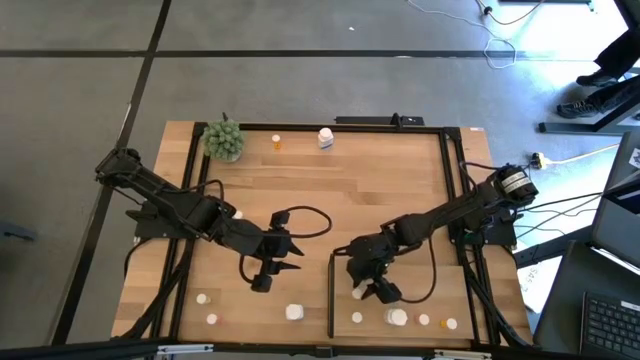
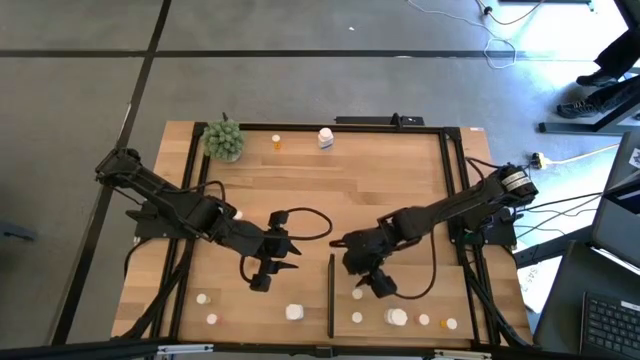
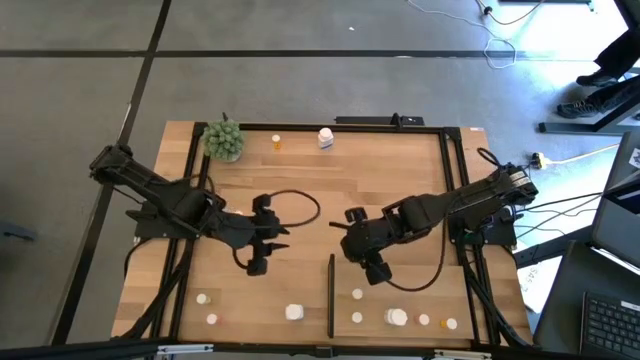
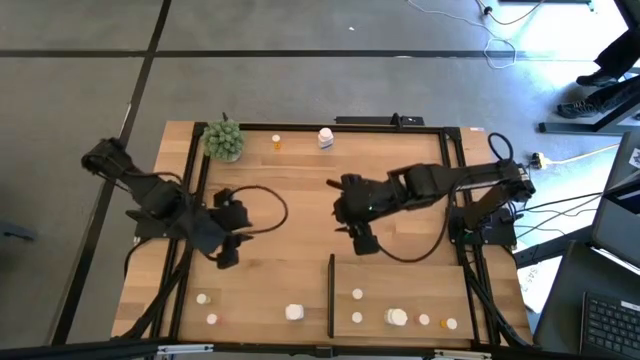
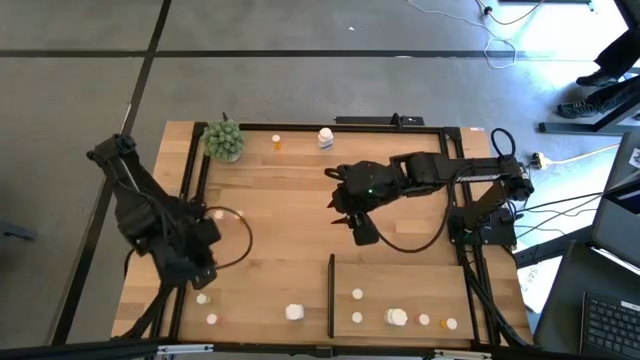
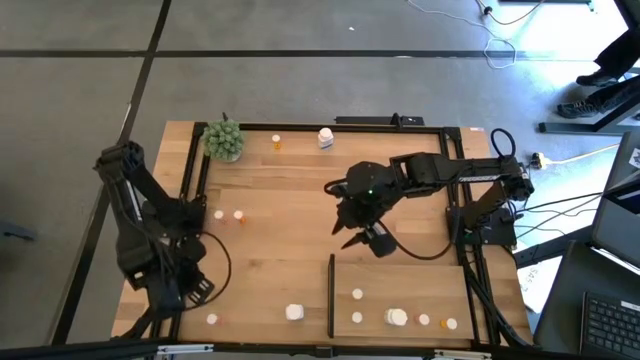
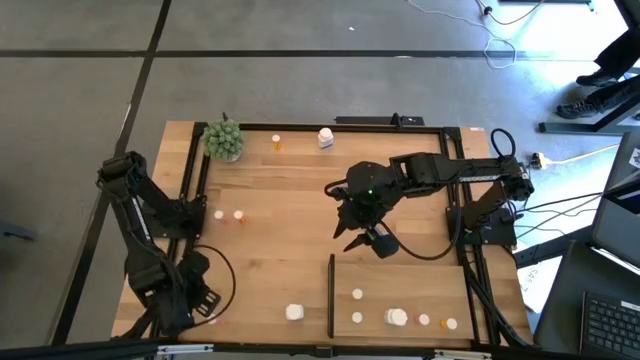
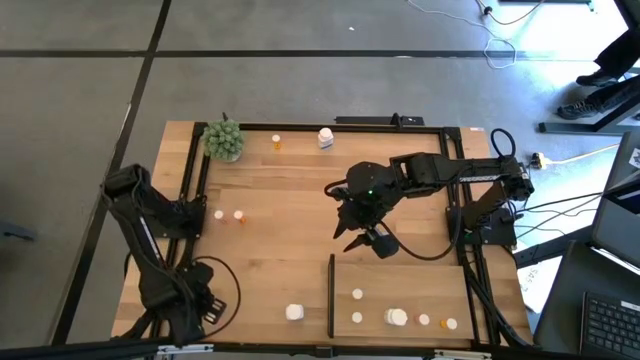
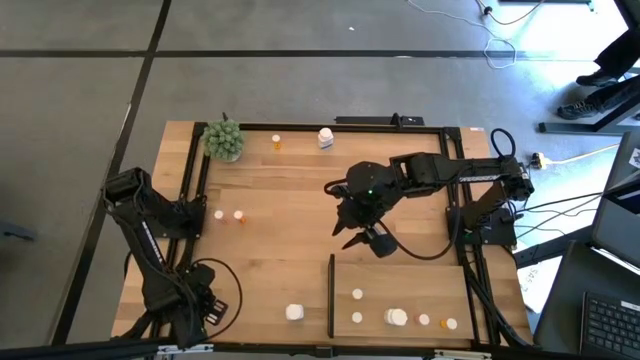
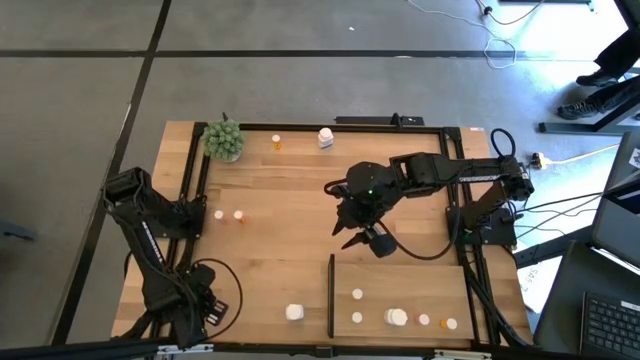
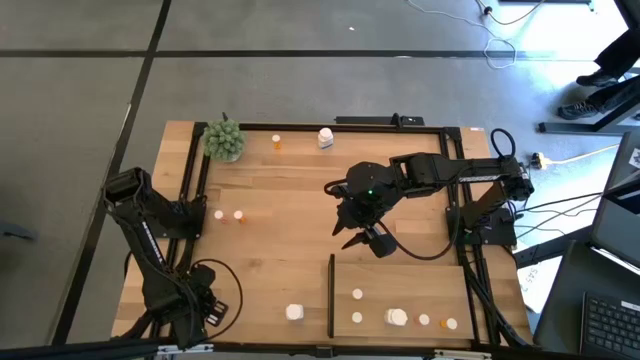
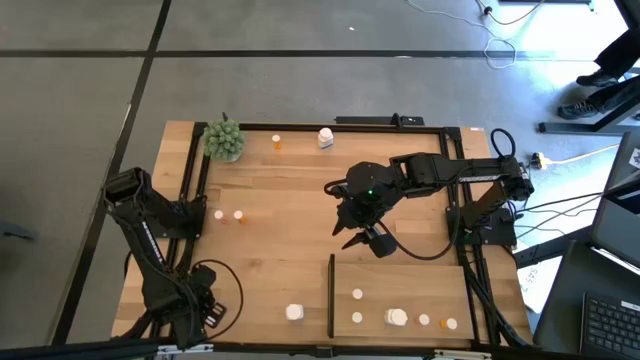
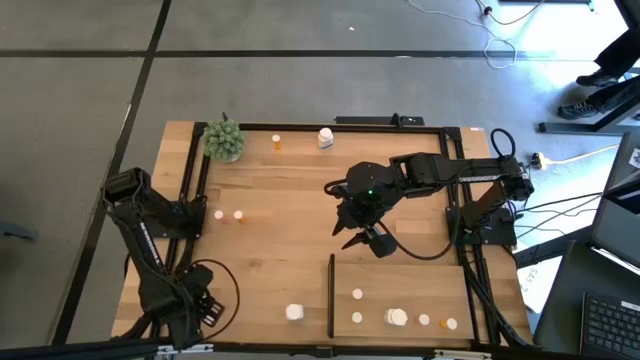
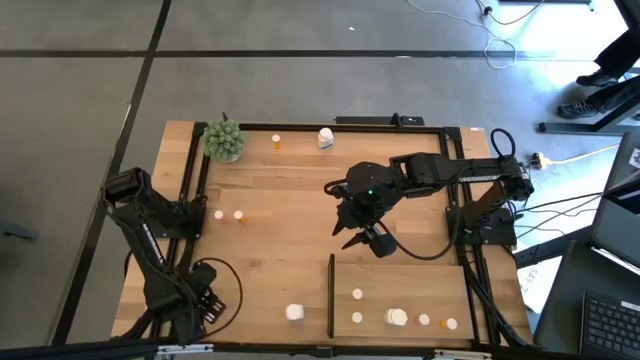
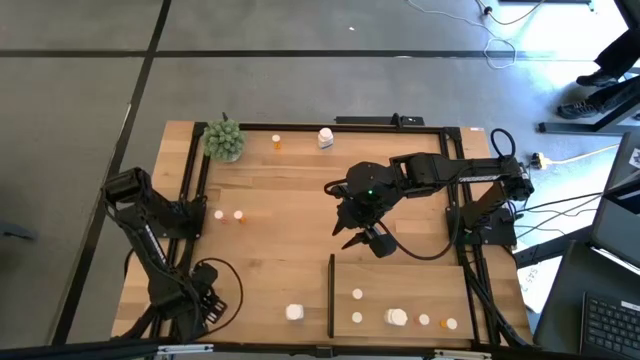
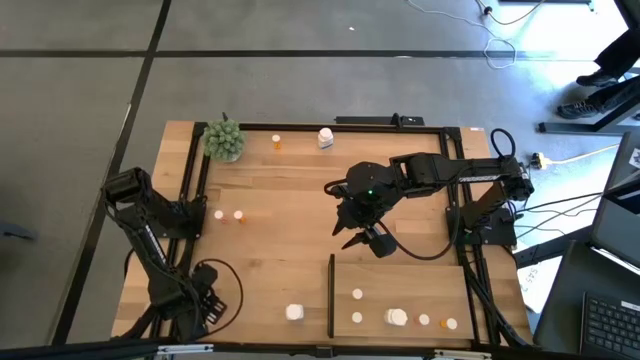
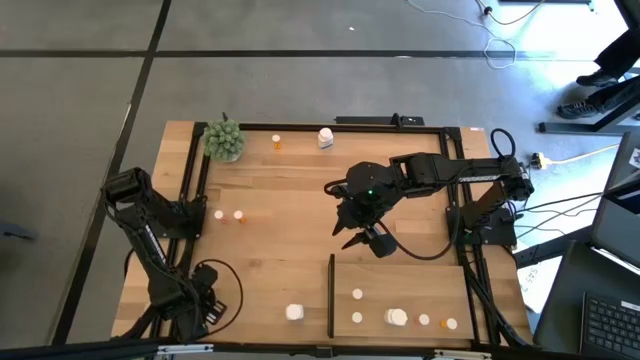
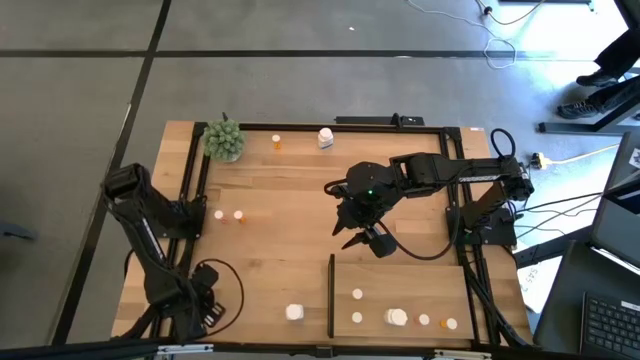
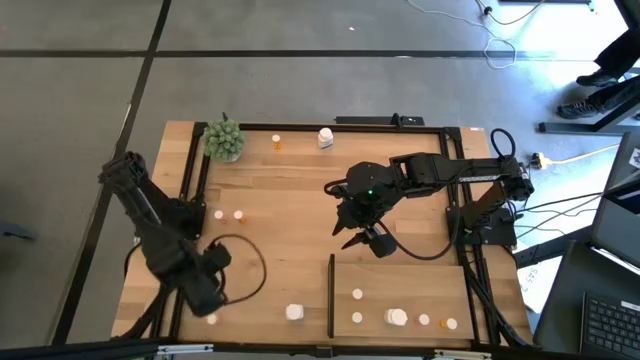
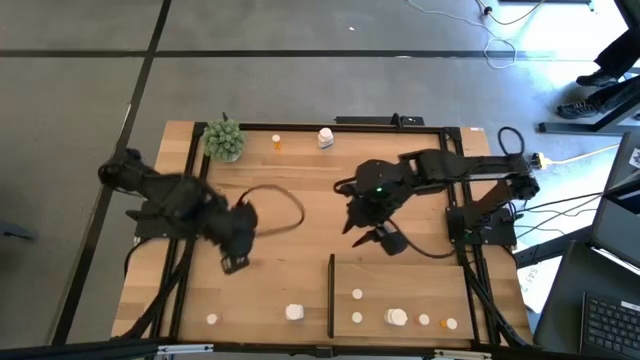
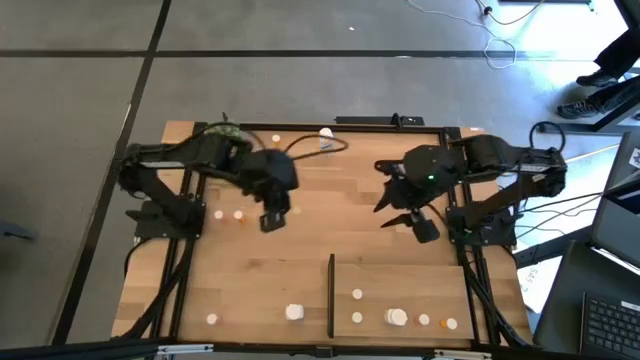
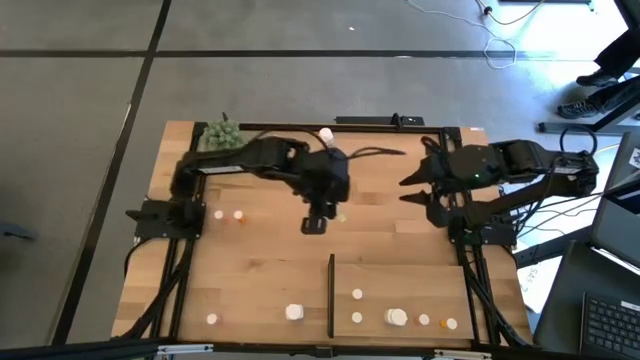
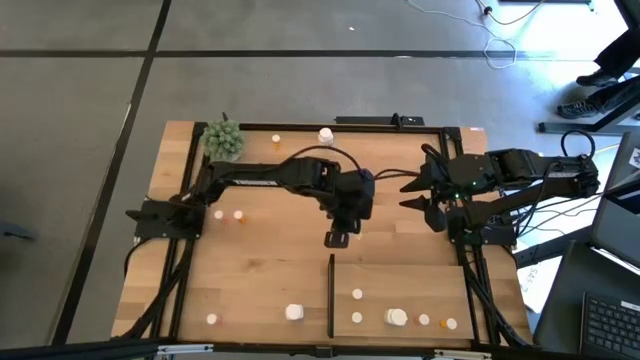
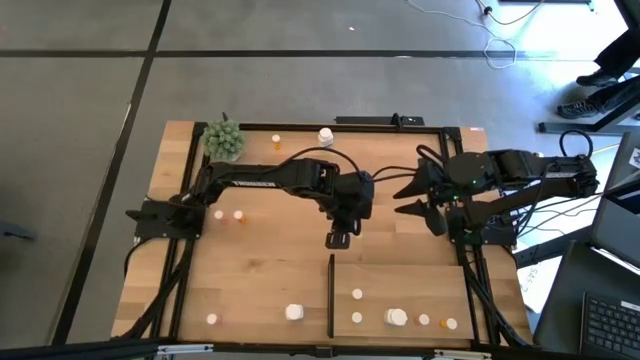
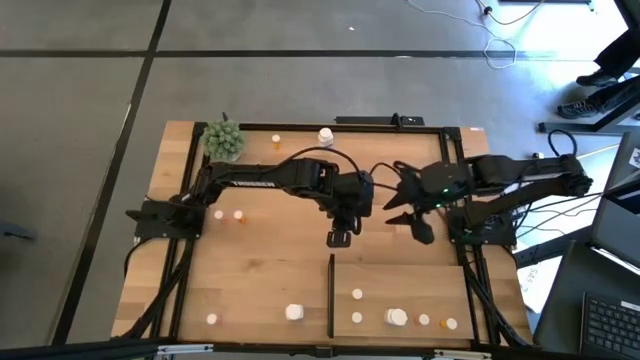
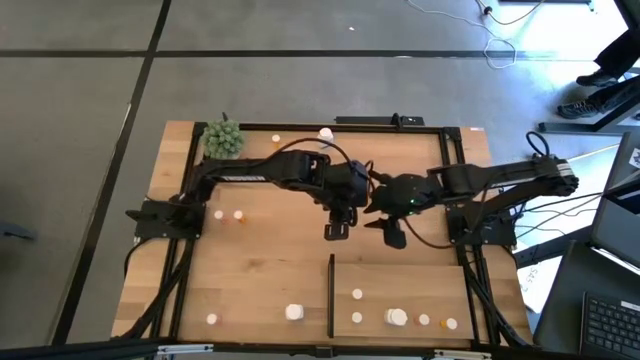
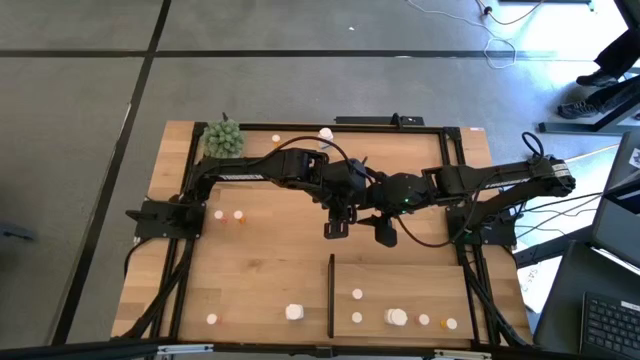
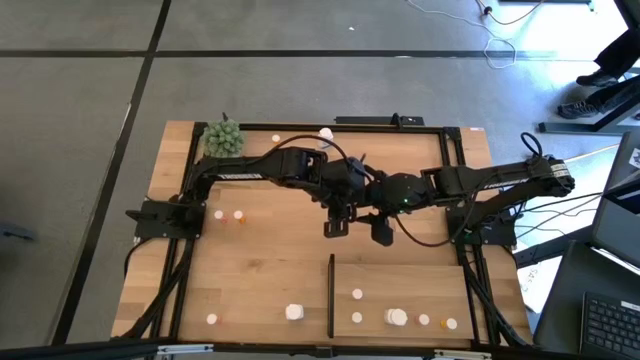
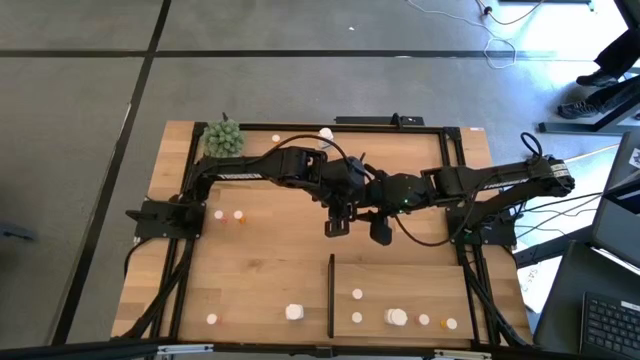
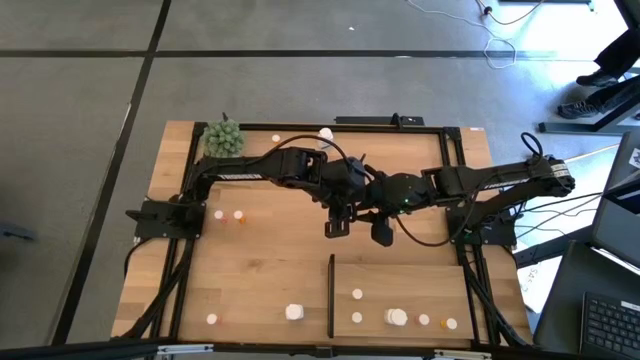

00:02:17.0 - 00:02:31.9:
Task: Pick and place medicine bottles onto shelf by color
Put the yellow pill bottle on the shelf aligned with the other yellow pill bottles

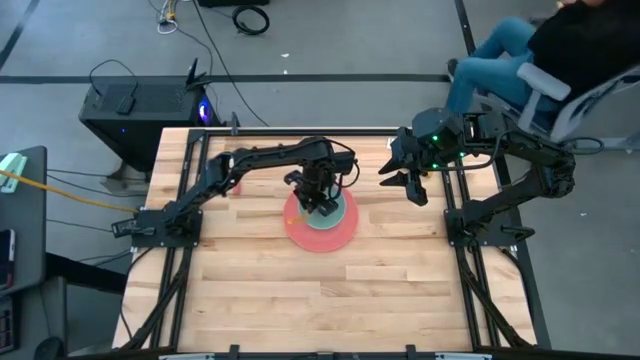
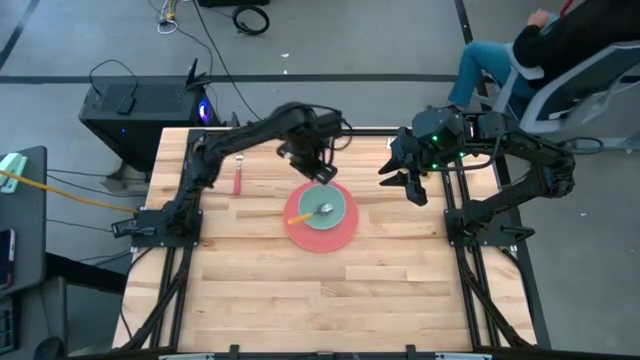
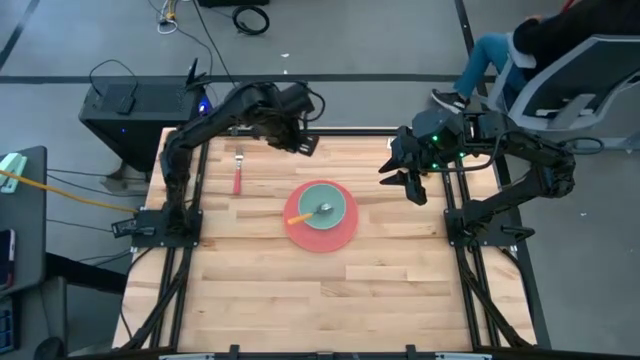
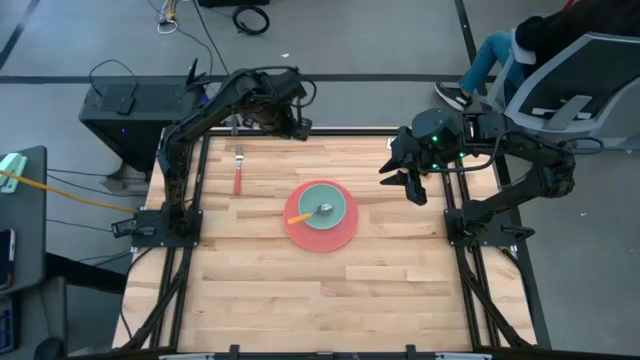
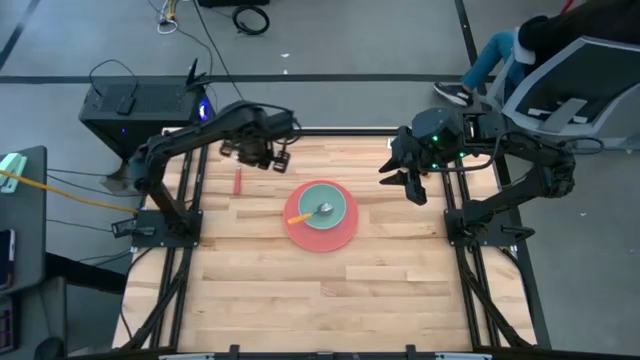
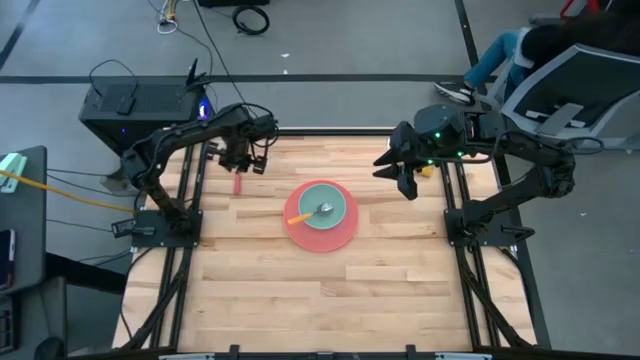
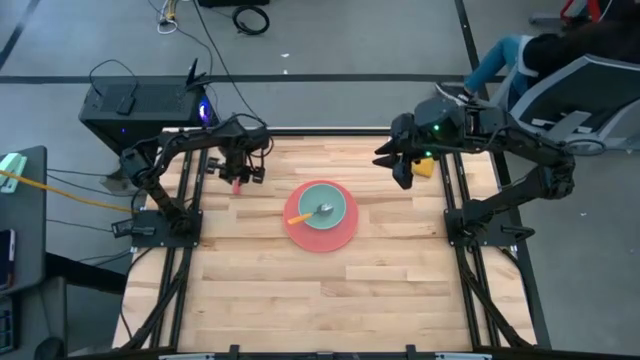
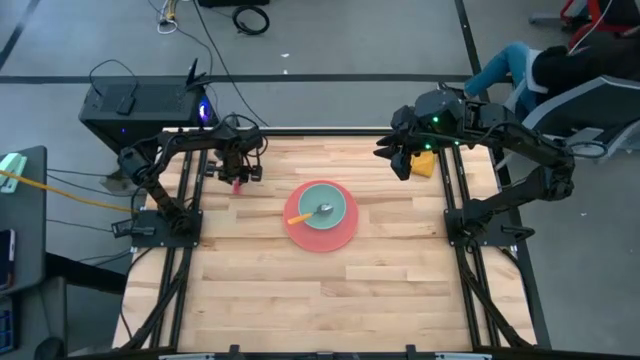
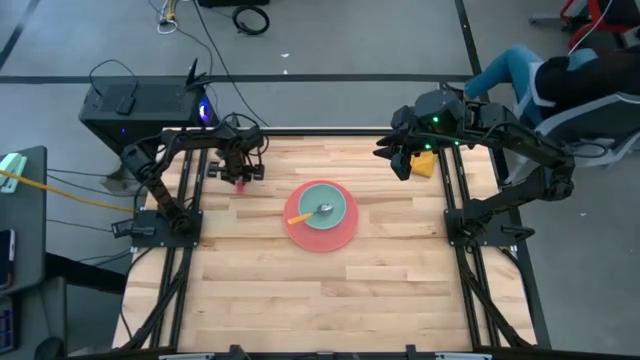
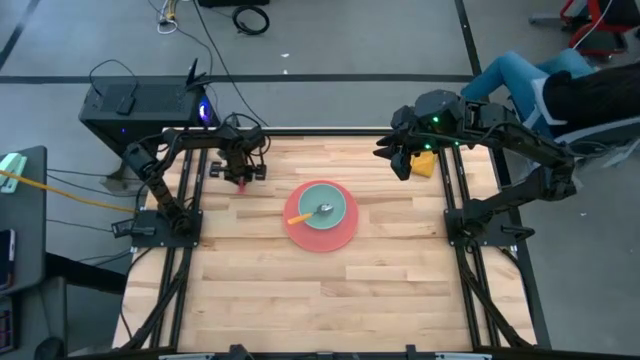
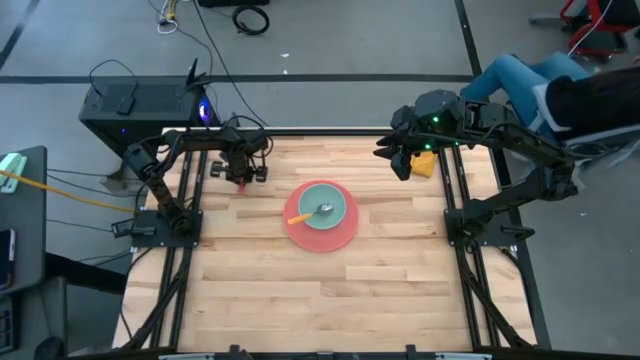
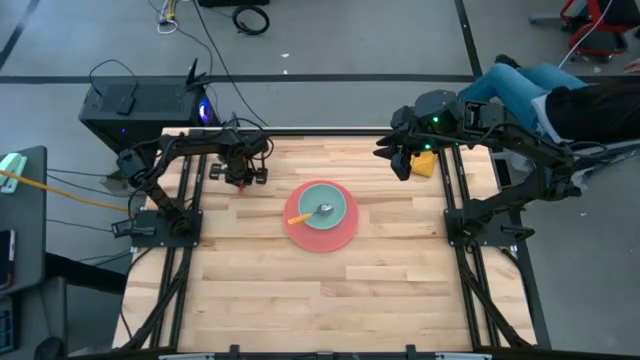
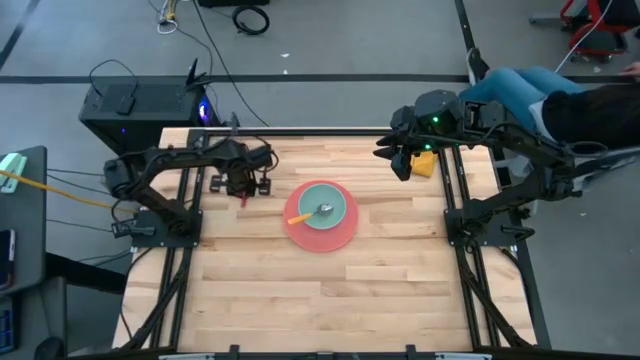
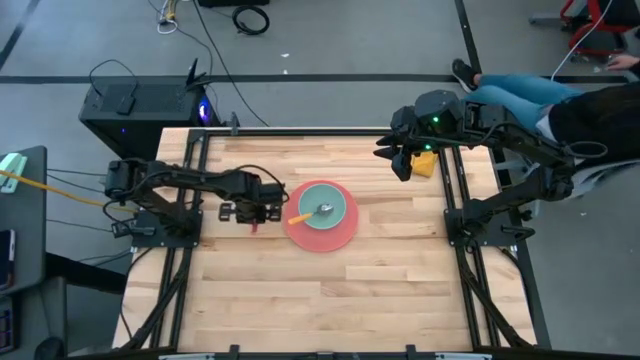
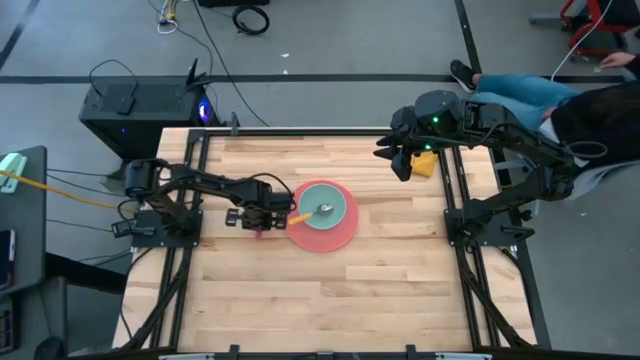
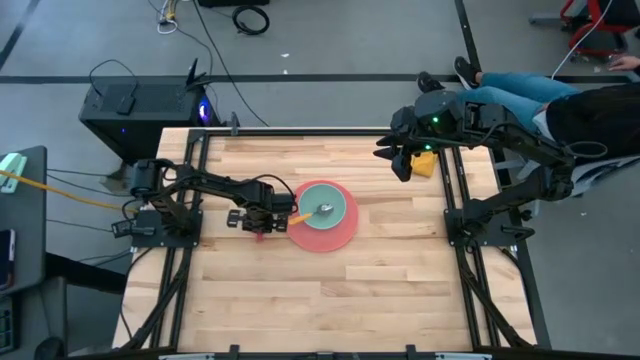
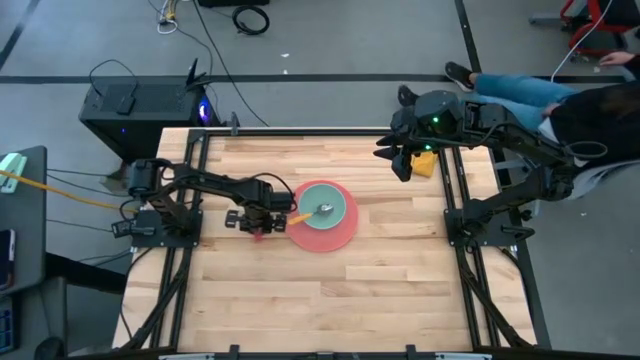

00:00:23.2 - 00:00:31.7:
Task: Set table place
Put the red fork to the left side of the pink plate
